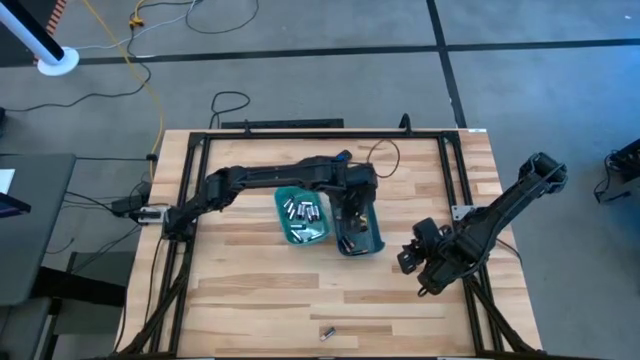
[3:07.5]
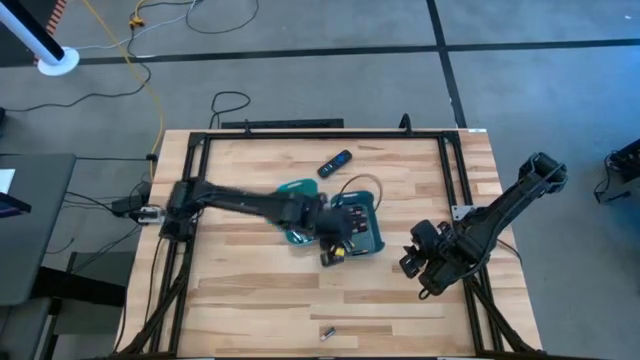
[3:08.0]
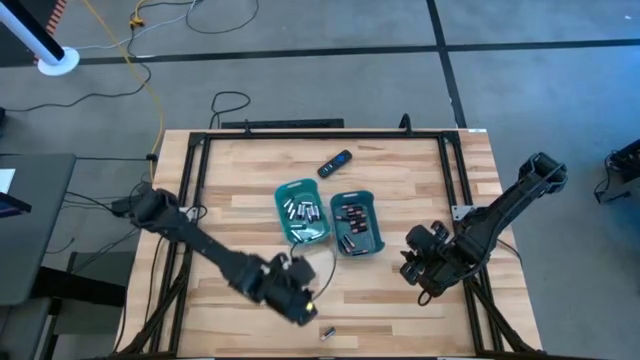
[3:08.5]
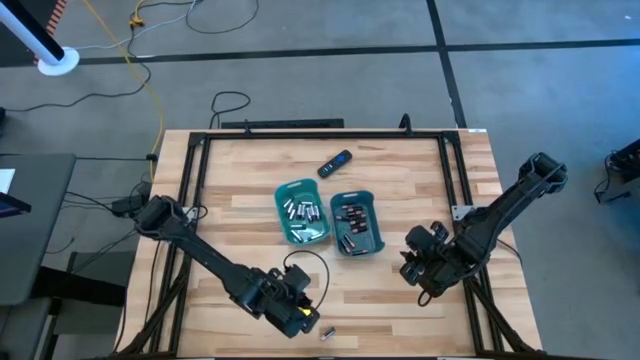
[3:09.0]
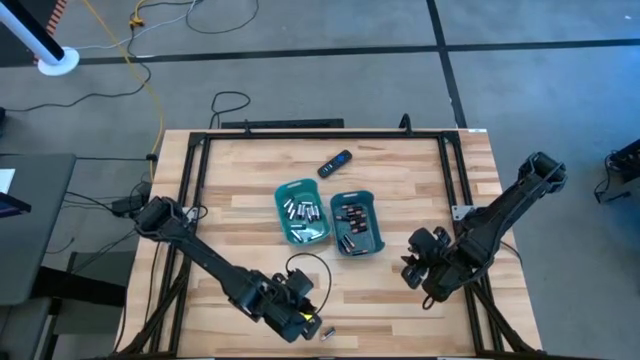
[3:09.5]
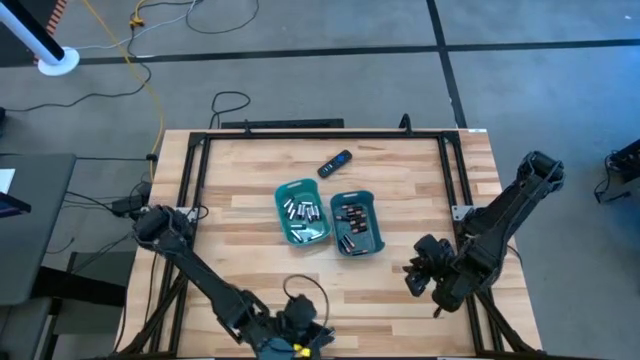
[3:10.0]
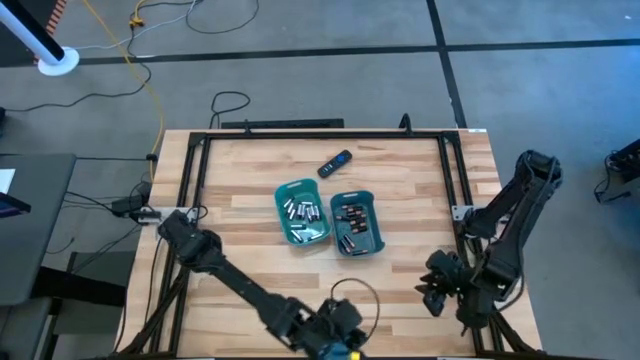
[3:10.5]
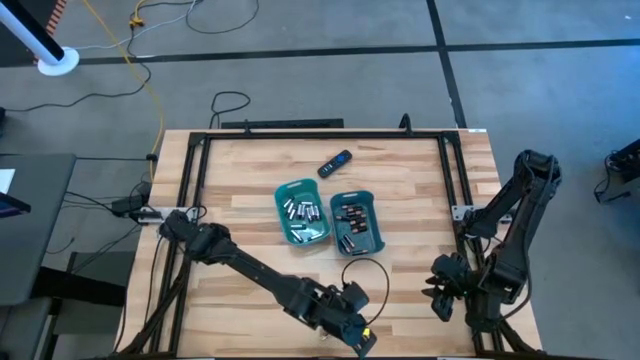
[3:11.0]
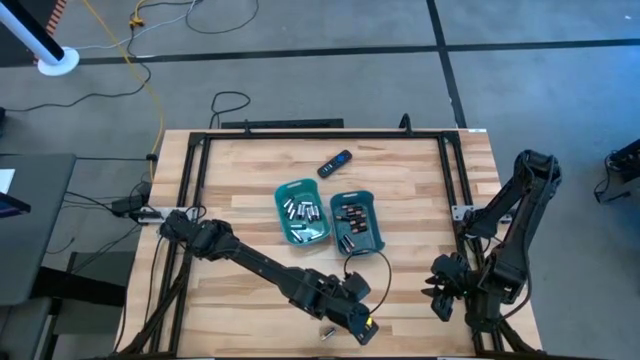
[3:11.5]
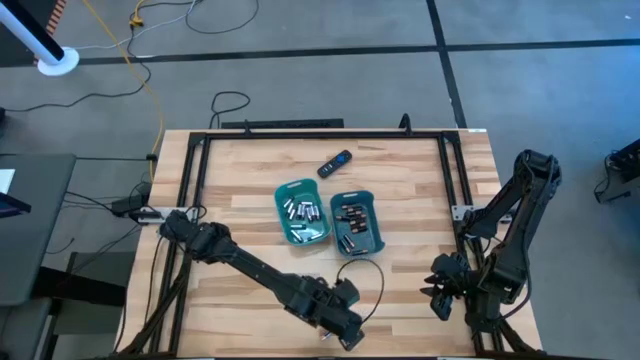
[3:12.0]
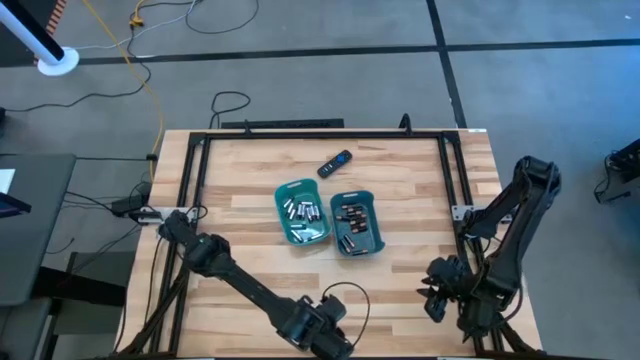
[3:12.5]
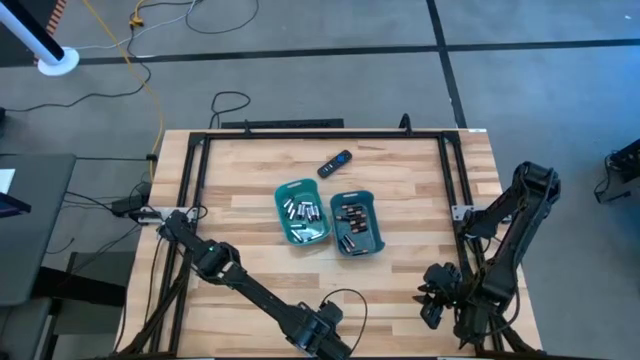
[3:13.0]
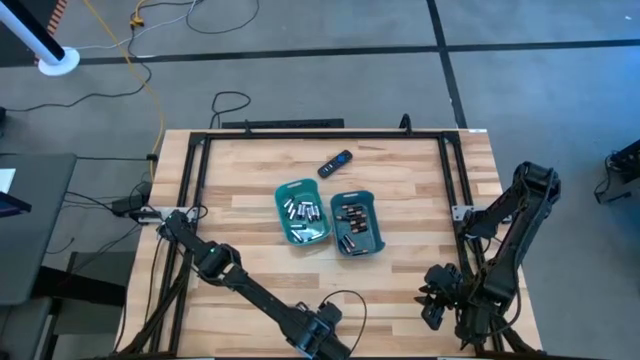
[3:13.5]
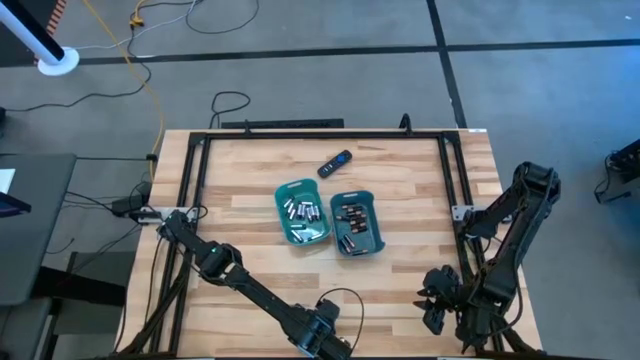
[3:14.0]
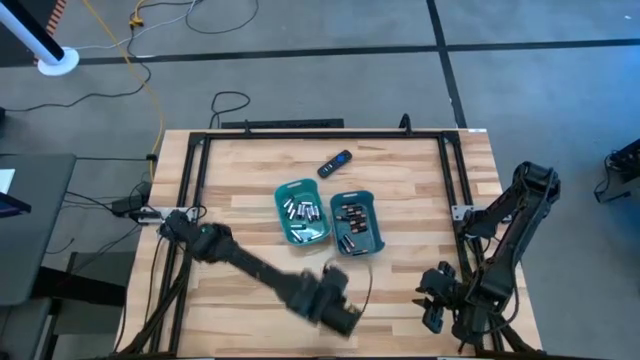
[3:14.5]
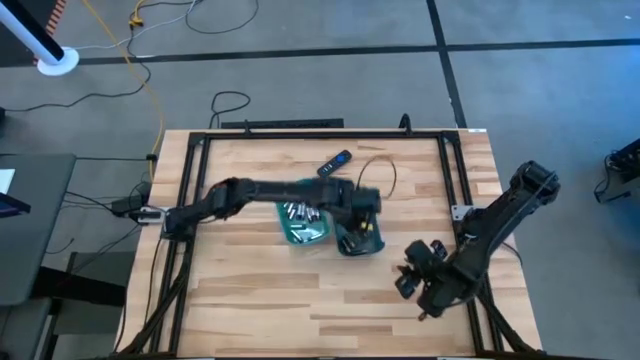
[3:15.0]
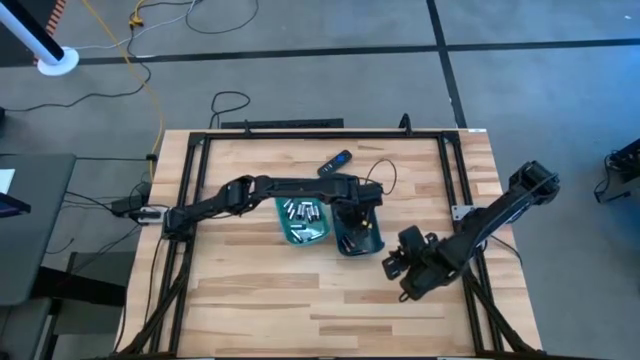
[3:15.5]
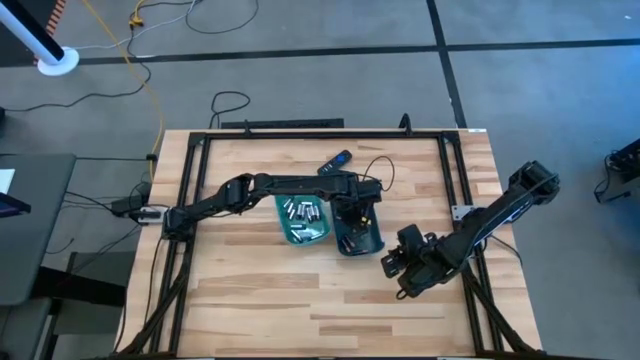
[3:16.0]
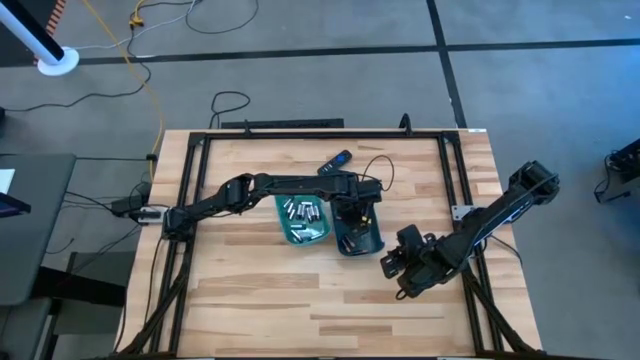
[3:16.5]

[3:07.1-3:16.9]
Task: Sort batteries
Put the copper and black battery into the blue bin

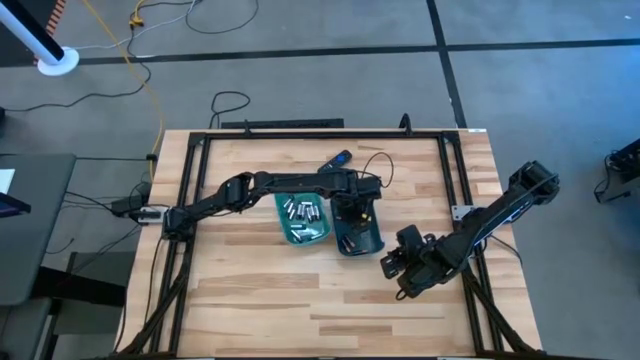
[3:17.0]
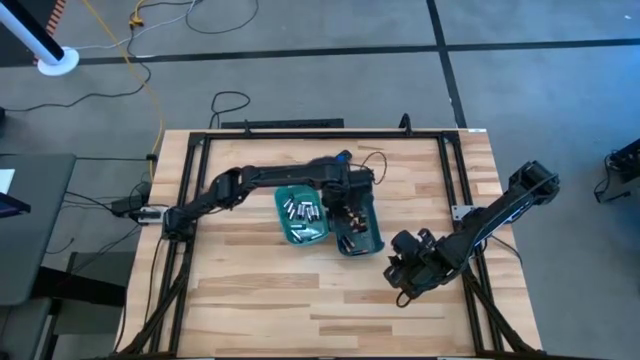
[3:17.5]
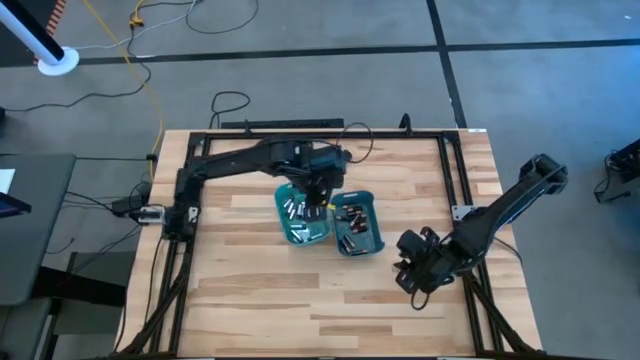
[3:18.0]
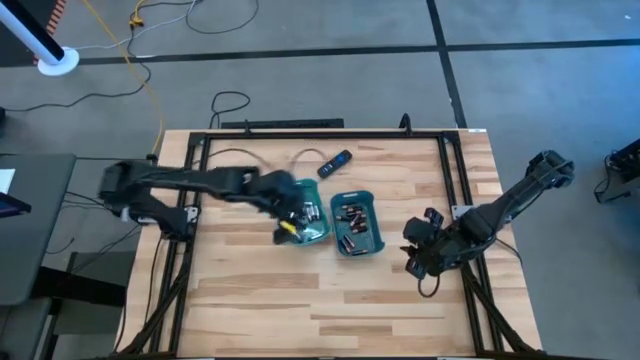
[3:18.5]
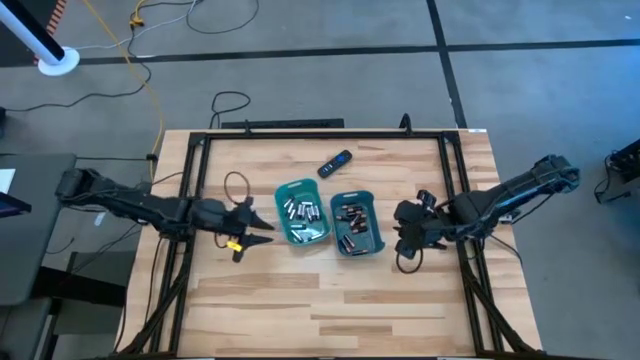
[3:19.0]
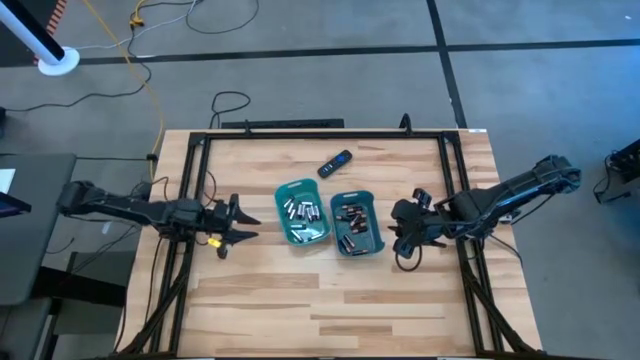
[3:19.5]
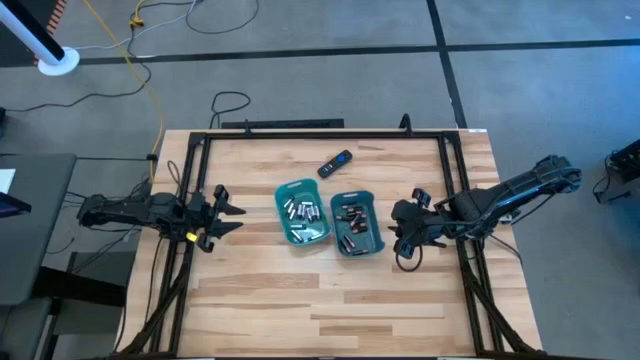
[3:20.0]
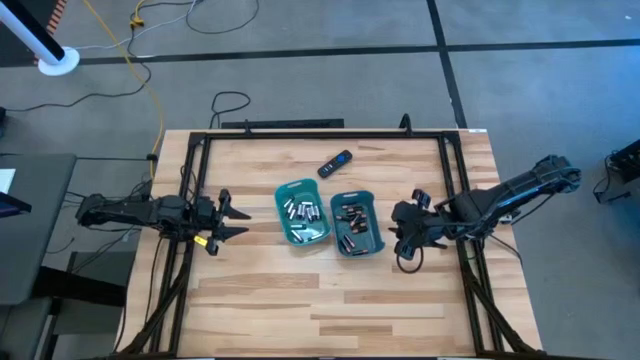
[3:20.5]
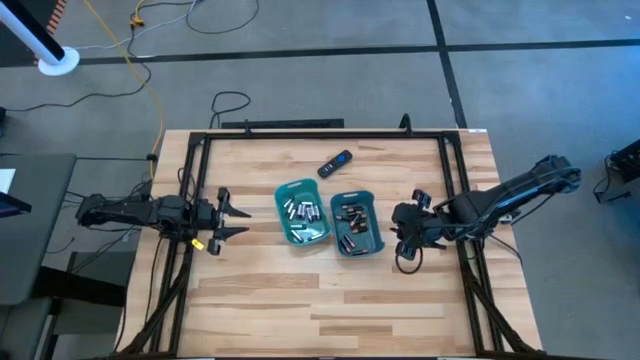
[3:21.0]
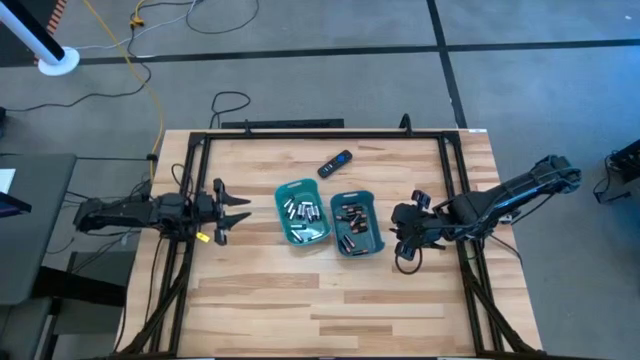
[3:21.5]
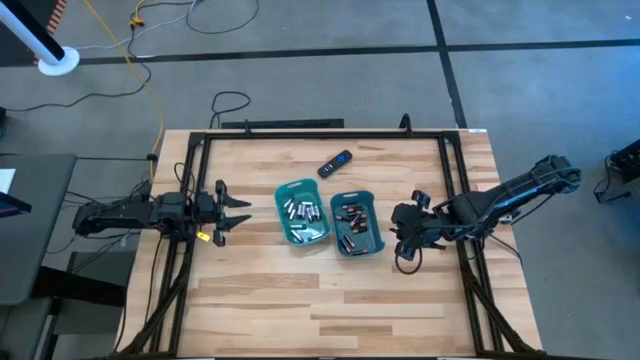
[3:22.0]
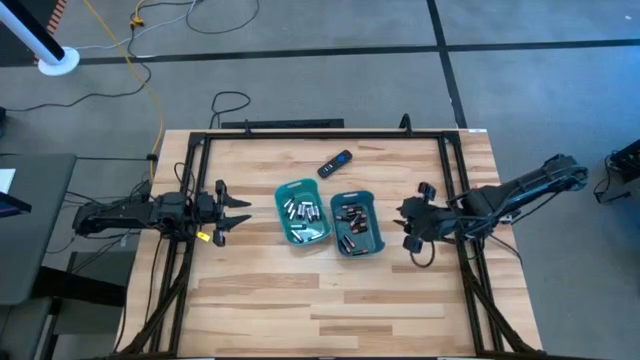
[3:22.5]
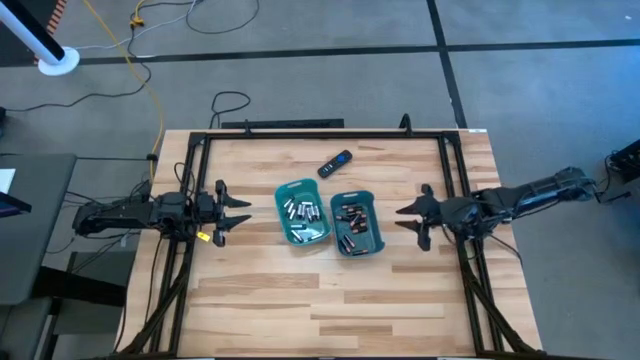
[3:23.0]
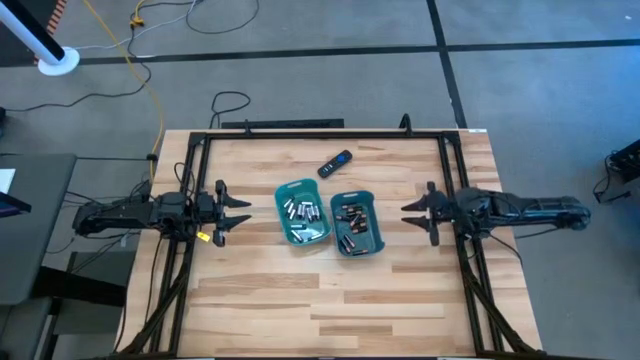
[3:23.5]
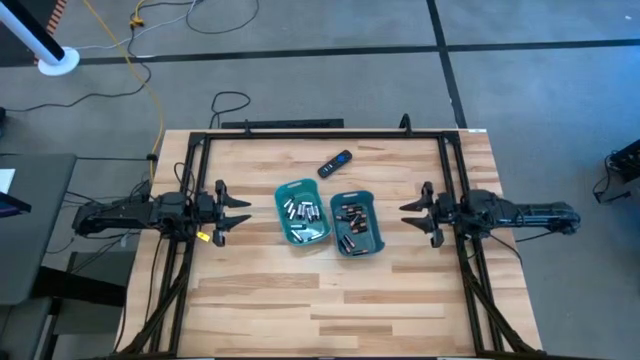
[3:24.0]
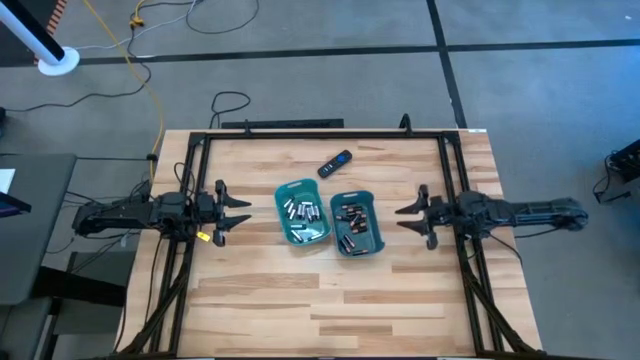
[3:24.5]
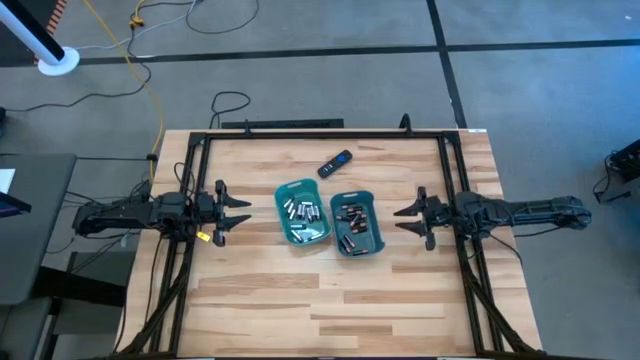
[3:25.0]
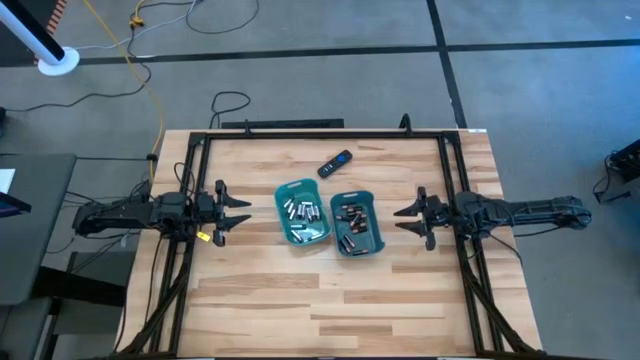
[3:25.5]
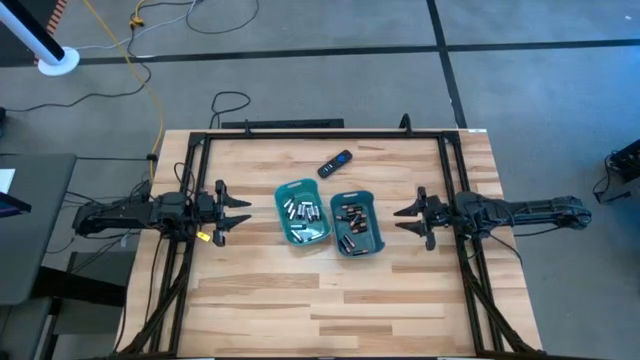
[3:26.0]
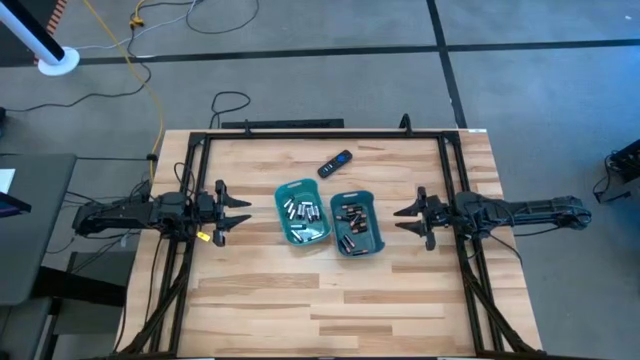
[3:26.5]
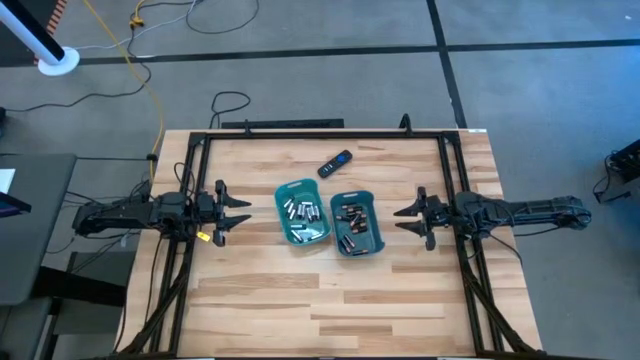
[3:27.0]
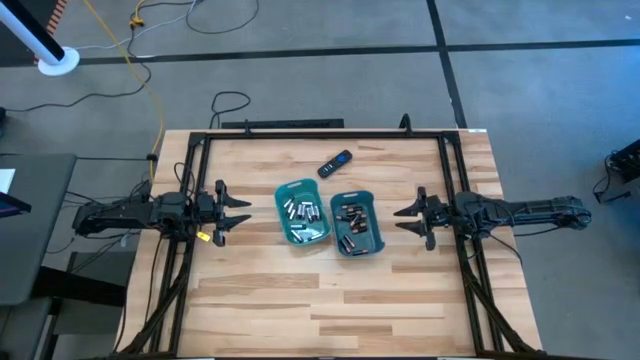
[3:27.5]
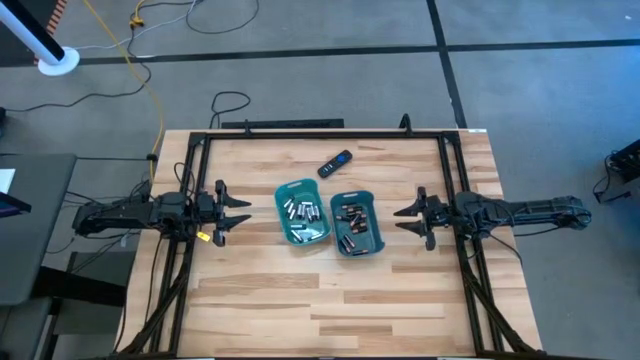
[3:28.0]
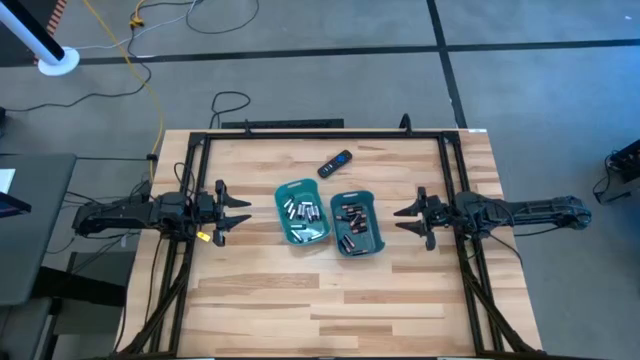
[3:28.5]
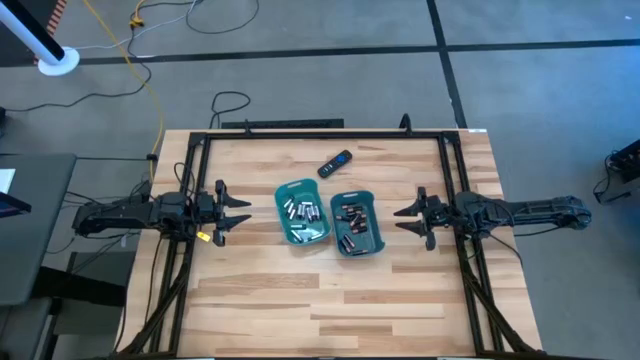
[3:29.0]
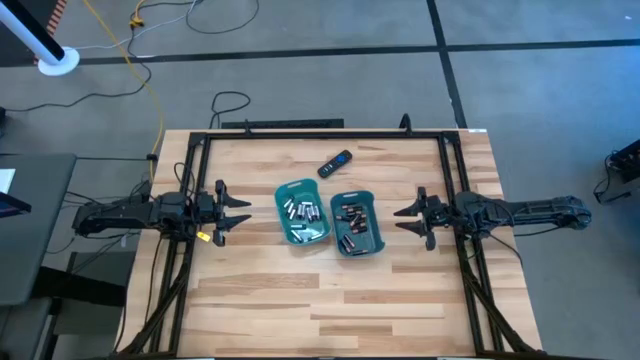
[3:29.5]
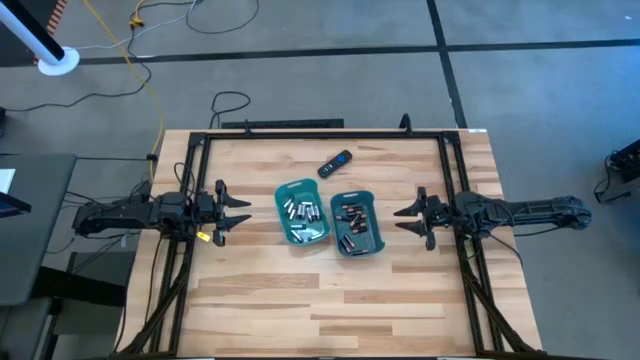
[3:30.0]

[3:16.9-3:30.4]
Return to Home Position
